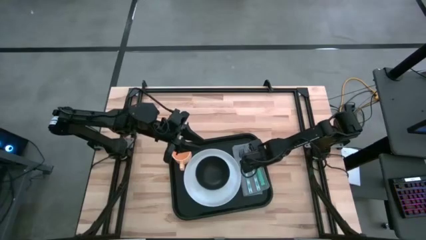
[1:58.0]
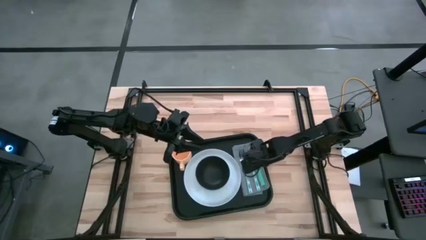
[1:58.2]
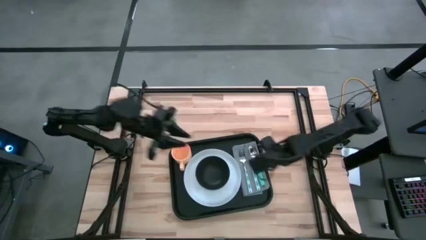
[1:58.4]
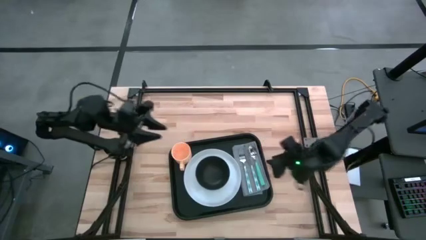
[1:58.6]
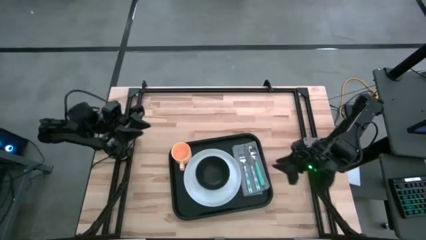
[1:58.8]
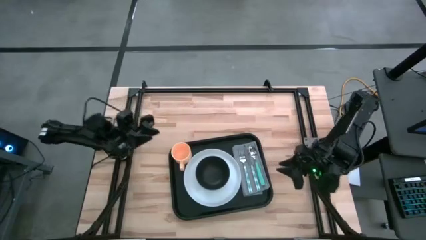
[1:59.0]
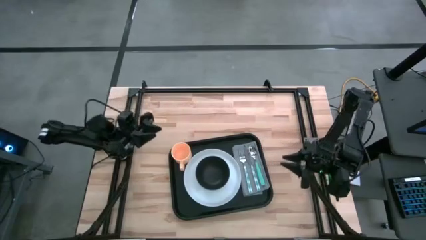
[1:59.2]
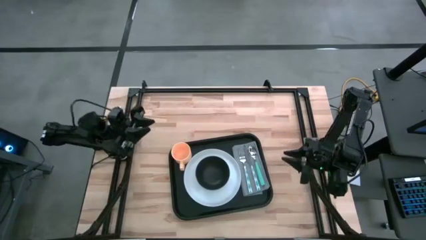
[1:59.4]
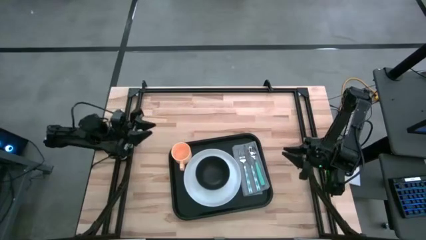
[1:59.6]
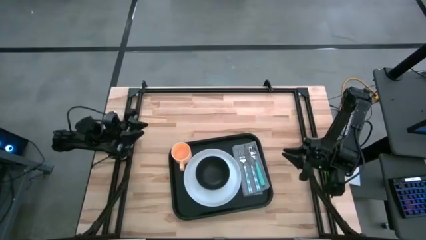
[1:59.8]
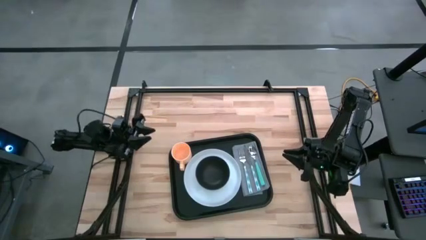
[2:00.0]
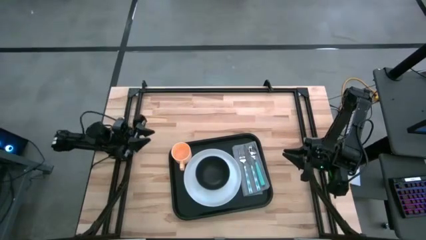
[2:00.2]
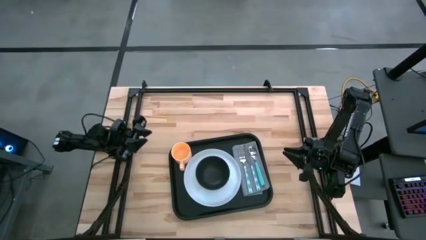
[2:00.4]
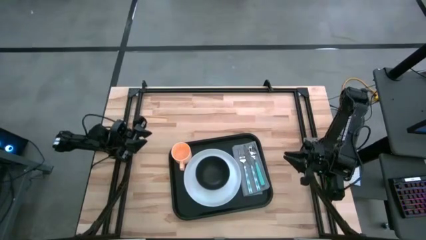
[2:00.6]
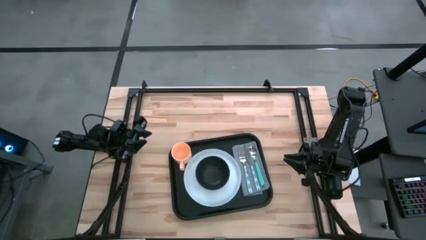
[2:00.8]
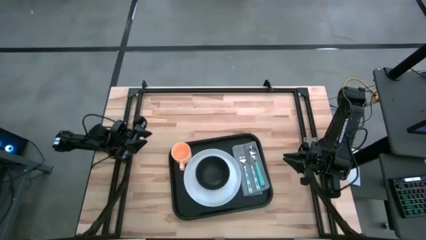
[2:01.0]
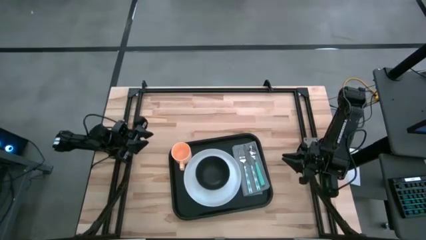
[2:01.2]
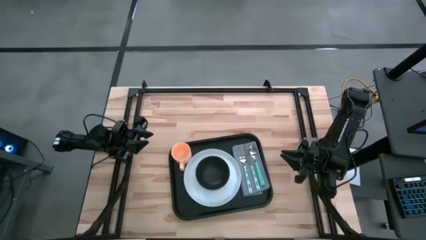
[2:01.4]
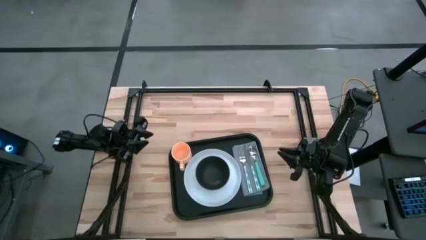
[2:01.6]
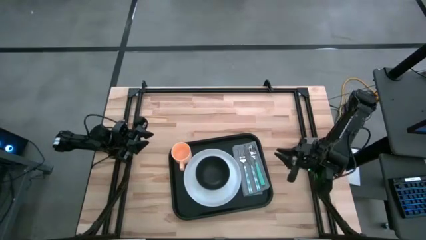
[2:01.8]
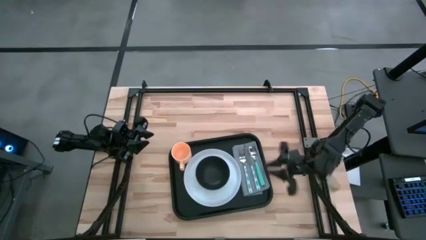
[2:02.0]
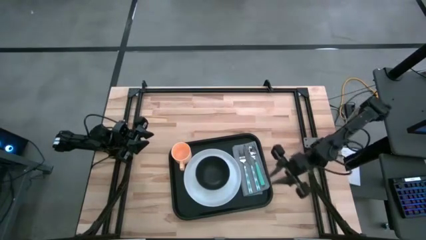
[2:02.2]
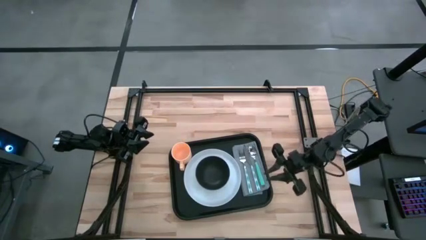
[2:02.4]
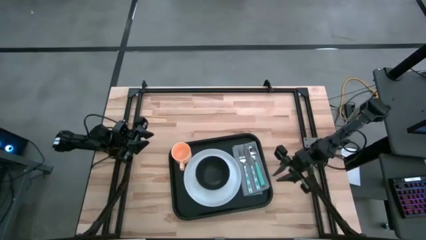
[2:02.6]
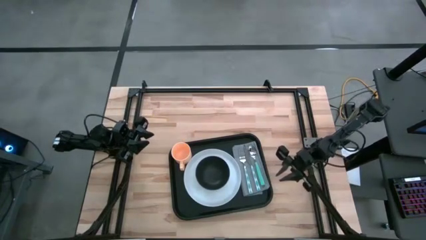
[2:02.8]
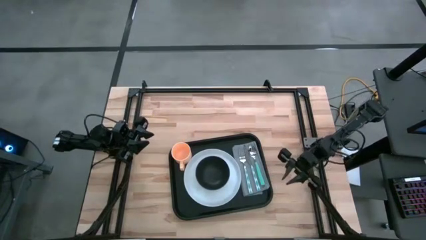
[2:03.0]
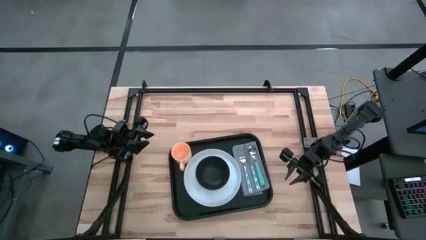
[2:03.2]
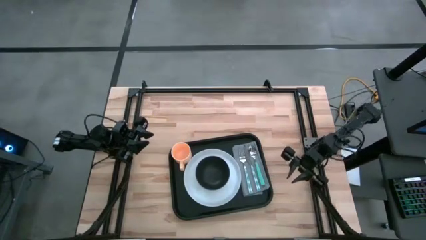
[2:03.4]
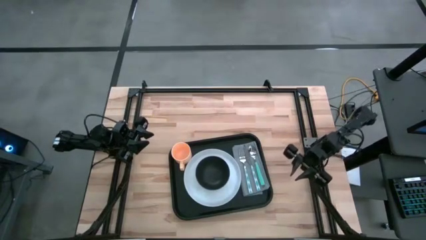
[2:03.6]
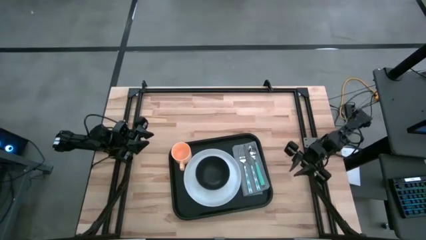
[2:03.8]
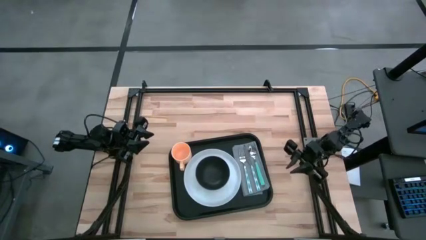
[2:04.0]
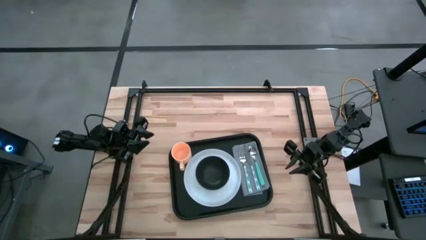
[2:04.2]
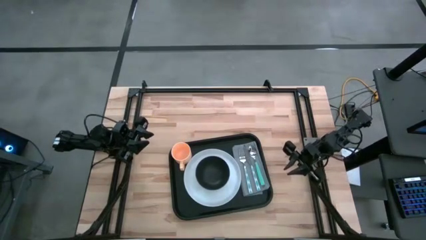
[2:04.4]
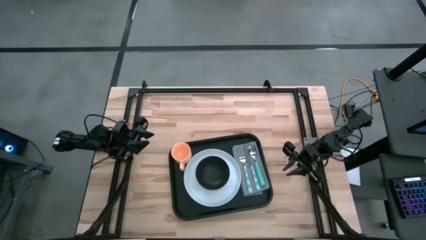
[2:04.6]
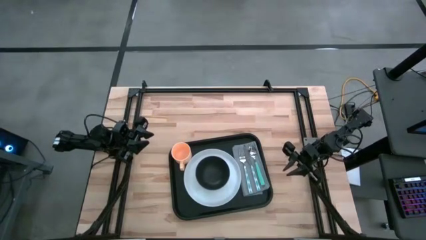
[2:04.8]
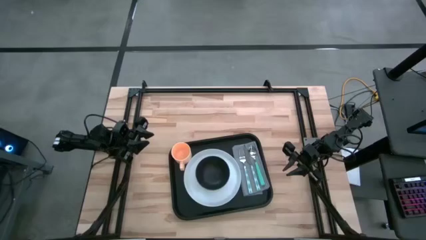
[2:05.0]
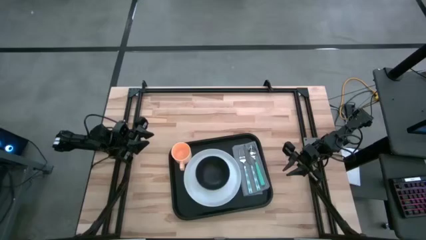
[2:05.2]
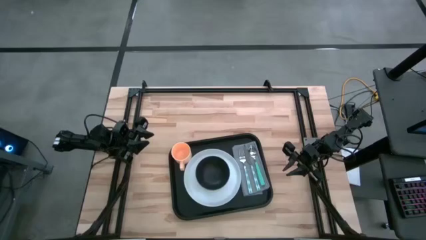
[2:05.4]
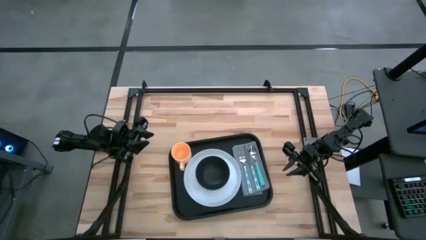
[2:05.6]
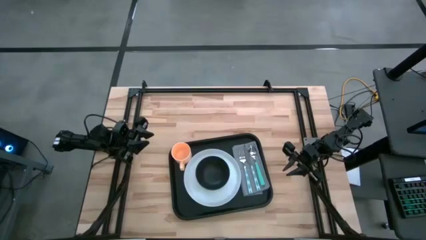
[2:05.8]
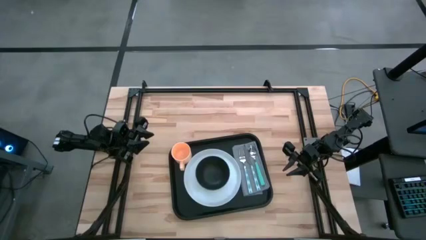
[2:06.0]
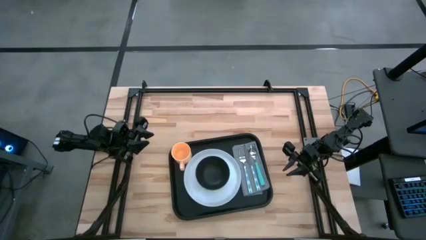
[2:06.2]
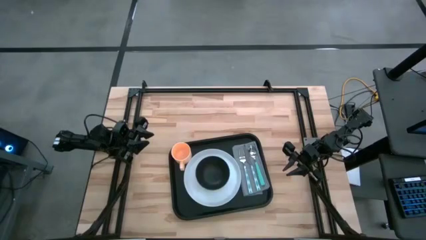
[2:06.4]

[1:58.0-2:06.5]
Task: Set up tray
Return to Home Position

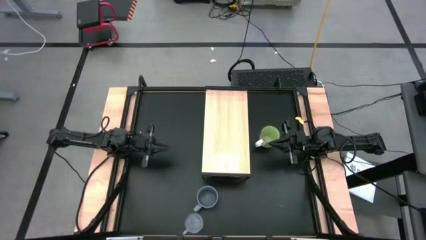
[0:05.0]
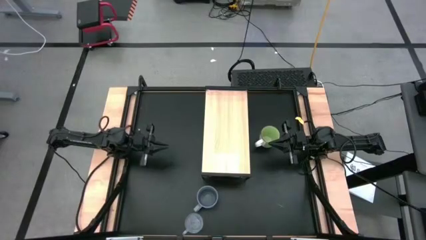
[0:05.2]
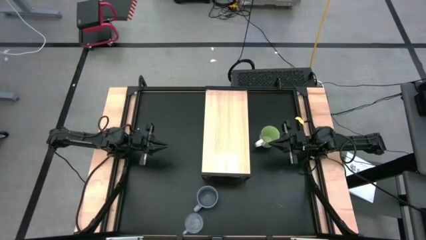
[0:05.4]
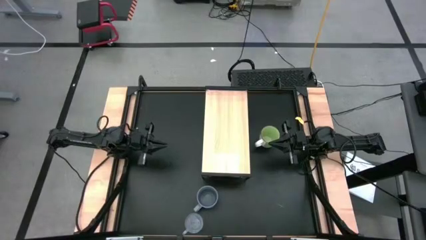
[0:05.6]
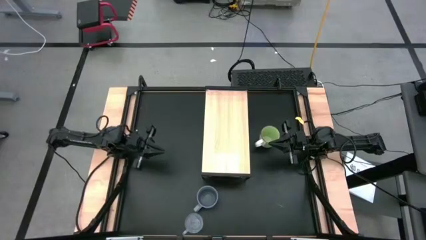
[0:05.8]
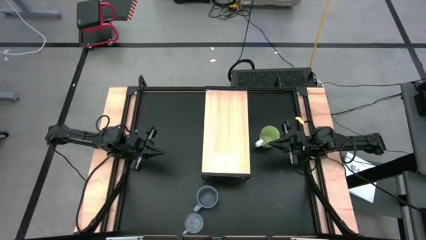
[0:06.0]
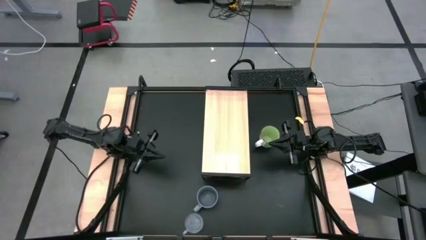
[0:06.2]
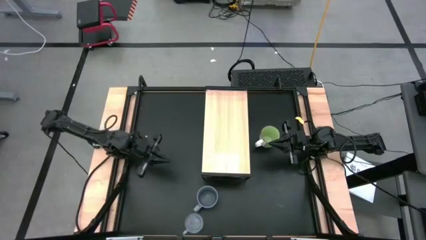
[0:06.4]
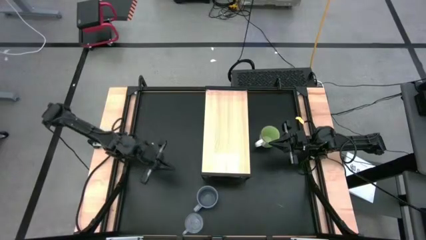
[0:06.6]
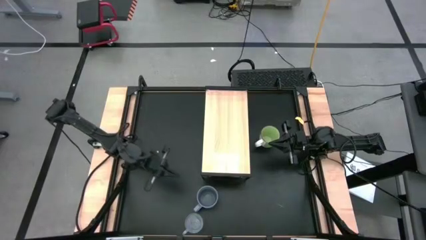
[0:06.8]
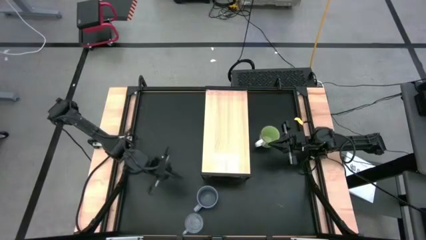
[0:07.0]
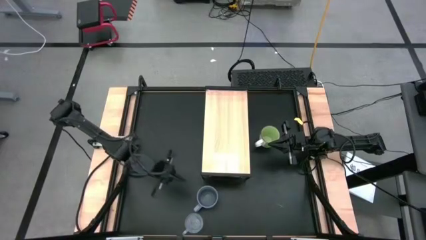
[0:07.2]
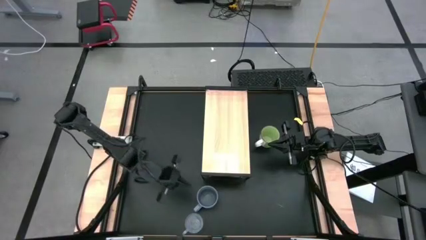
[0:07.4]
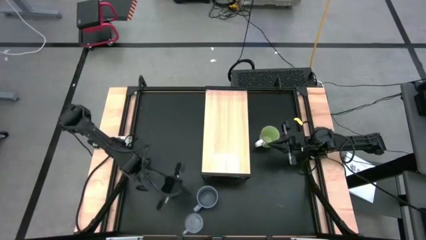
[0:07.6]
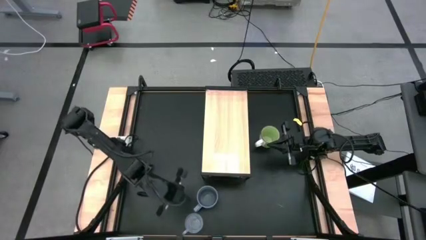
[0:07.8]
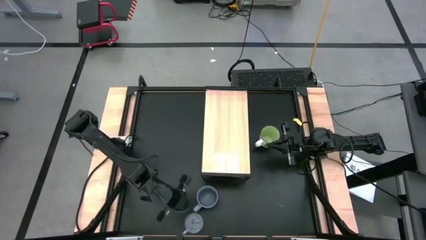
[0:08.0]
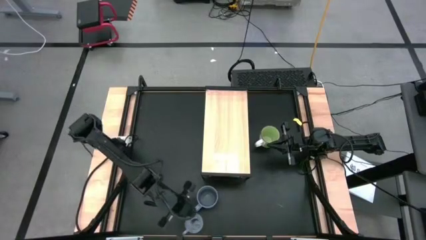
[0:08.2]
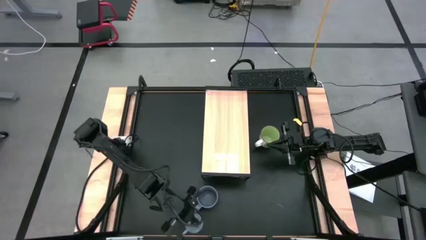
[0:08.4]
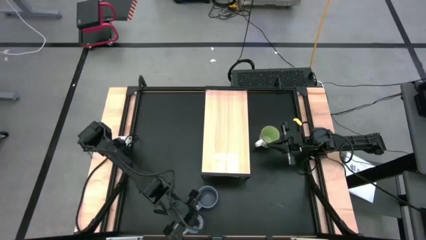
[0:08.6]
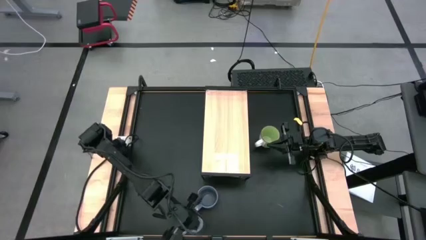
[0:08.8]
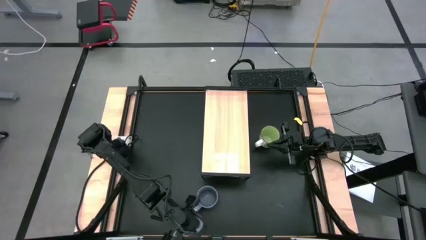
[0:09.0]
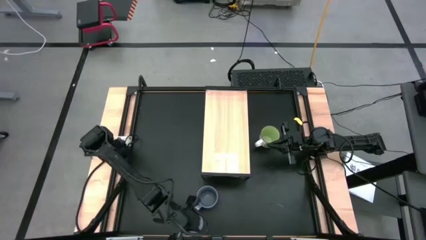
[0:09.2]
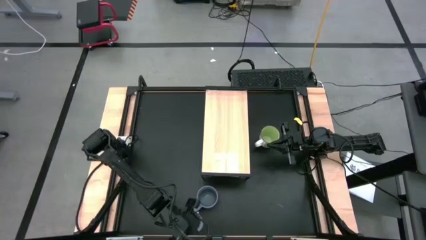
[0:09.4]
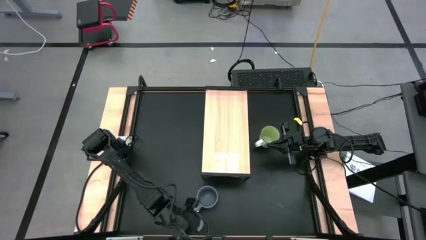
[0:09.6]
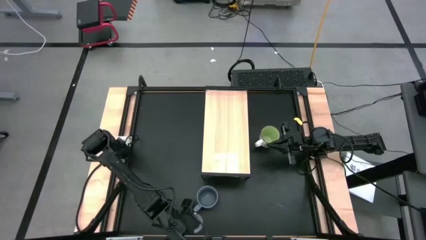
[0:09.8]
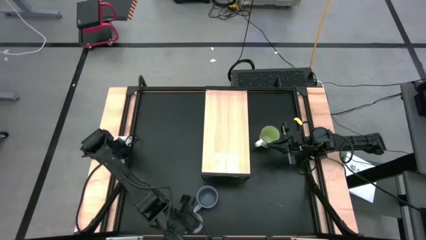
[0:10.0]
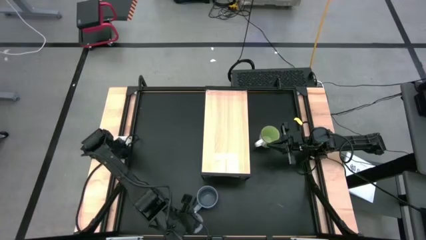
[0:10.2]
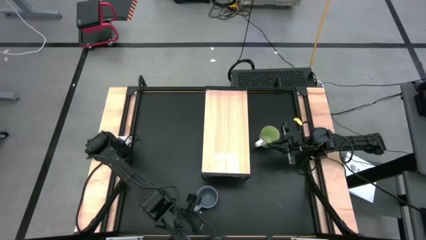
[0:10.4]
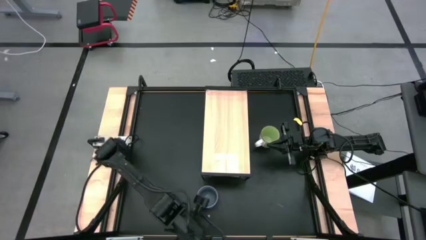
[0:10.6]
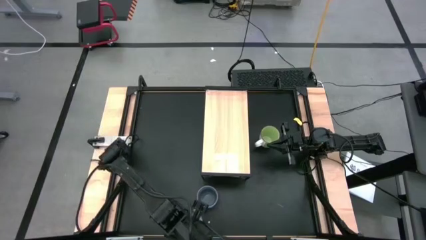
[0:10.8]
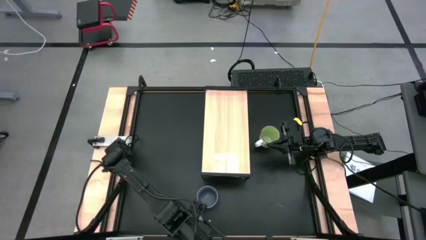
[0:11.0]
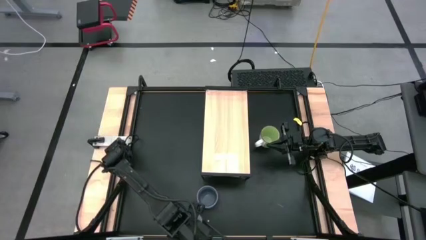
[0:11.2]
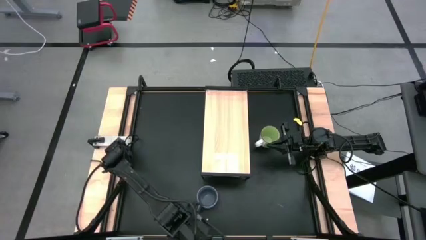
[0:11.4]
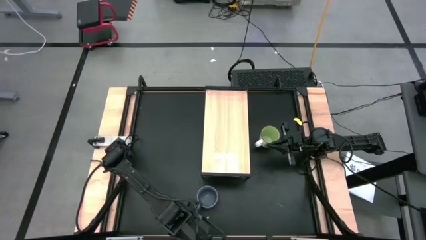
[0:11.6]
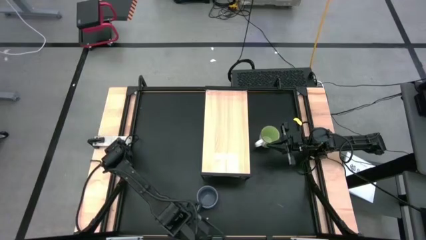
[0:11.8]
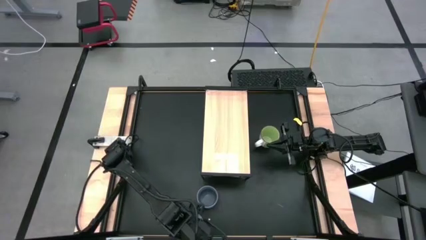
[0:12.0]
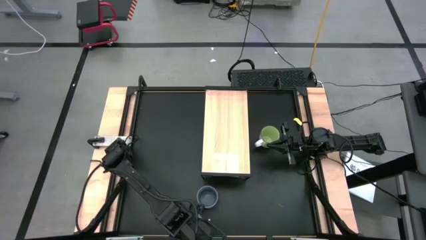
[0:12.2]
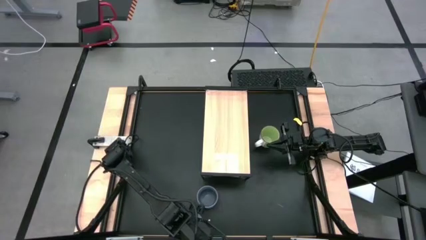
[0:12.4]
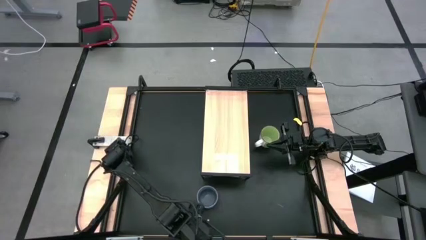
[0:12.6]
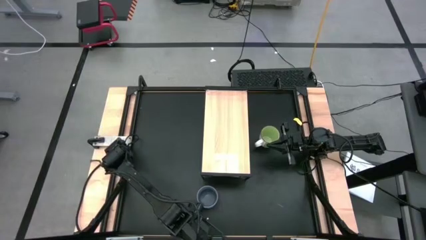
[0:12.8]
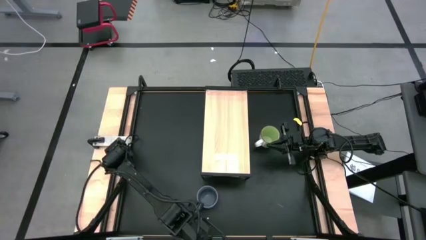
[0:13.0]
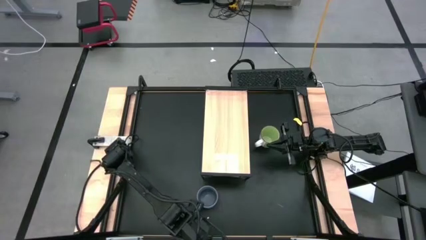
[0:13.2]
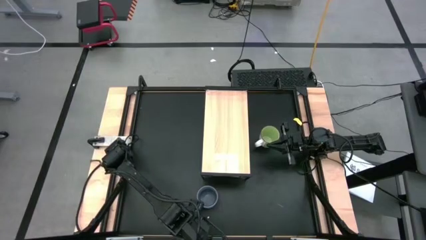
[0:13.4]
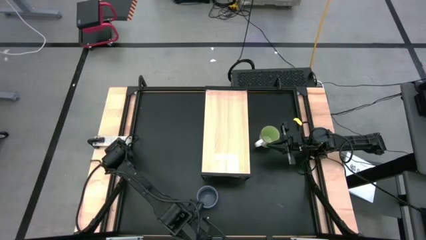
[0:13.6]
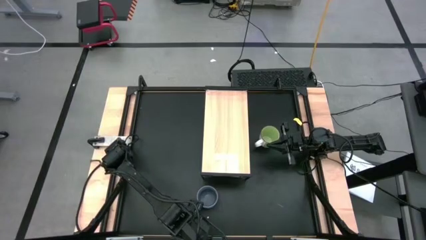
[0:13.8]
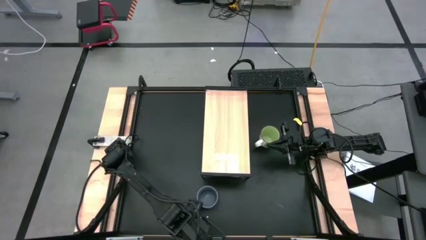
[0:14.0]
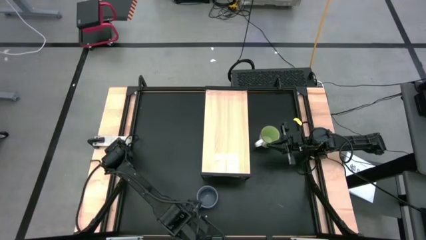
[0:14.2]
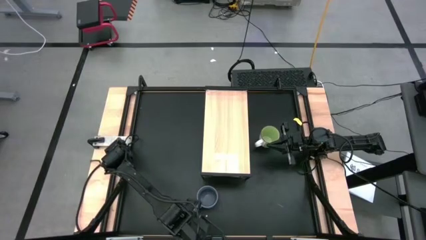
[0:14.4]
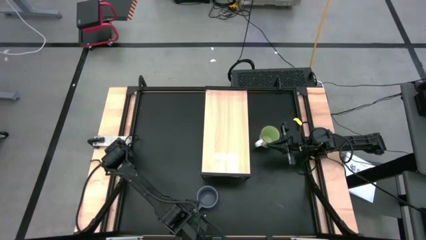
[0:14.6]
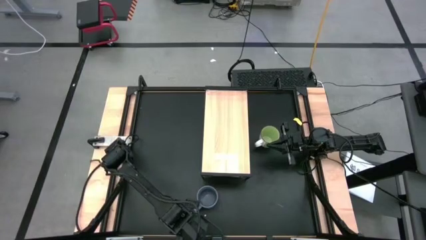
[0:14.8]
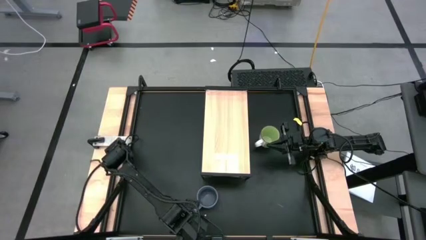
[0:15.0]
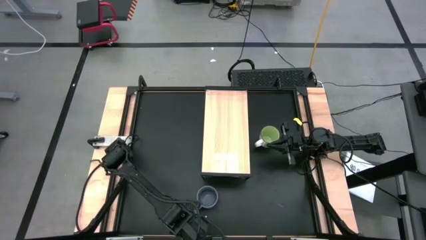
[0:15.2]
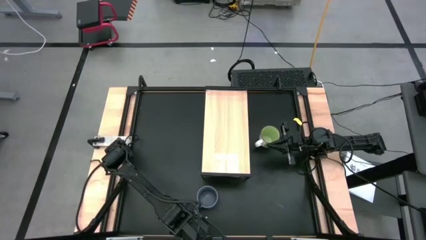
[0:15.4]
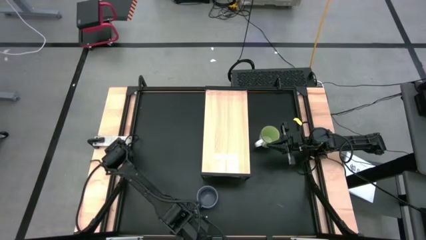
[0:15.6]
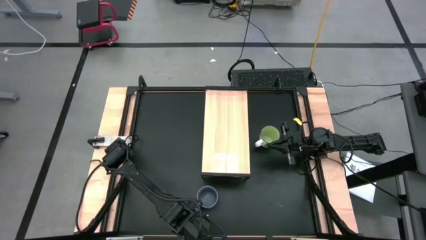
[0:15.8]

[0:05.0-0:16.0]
Task: Stack small to large cups/mugs on shelf
Put the transparent mug on the shelf
